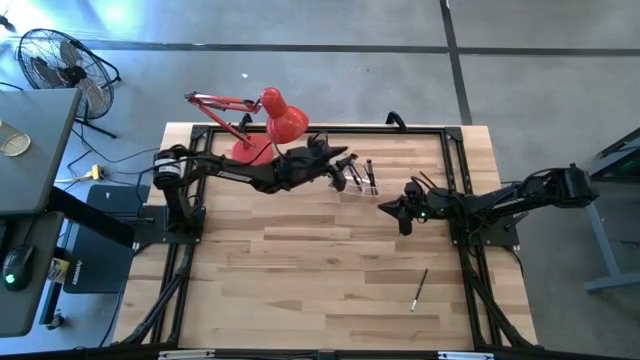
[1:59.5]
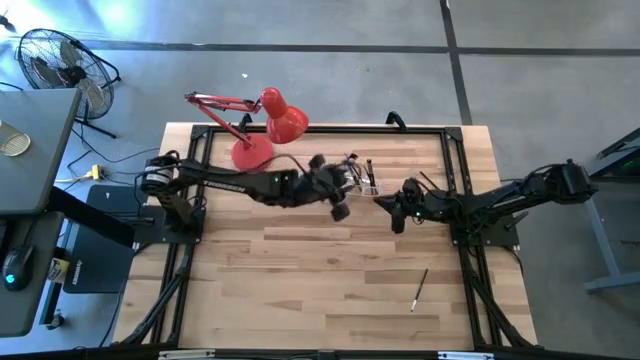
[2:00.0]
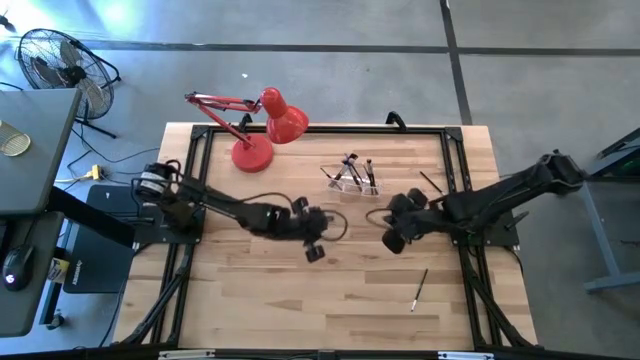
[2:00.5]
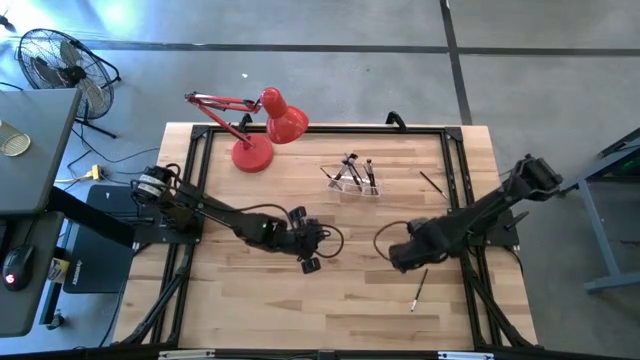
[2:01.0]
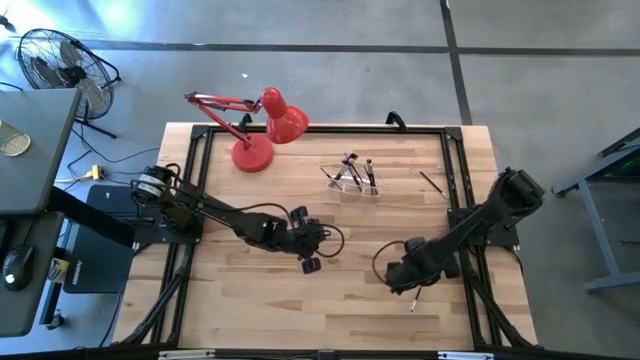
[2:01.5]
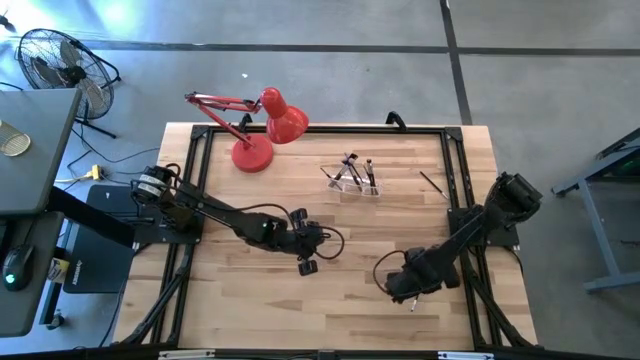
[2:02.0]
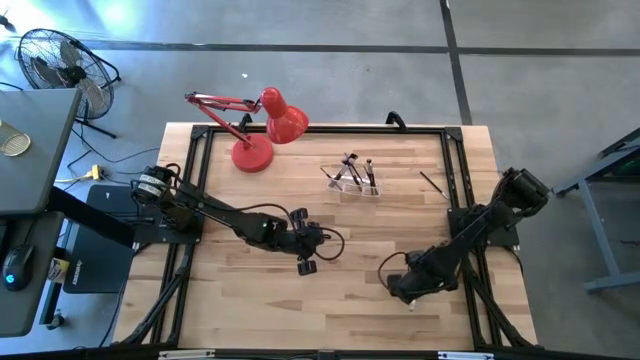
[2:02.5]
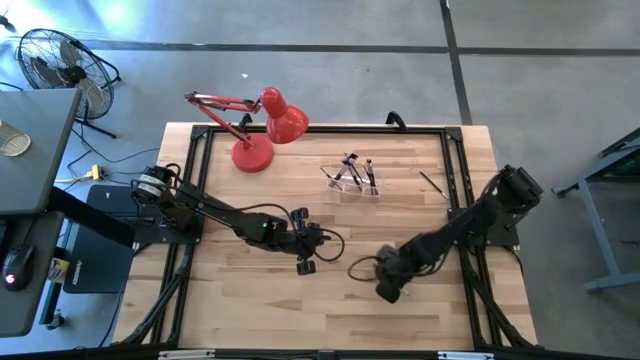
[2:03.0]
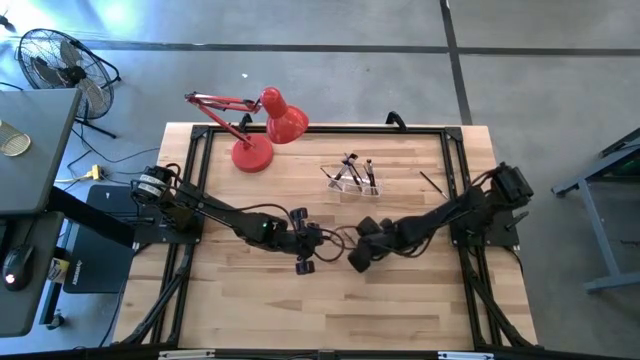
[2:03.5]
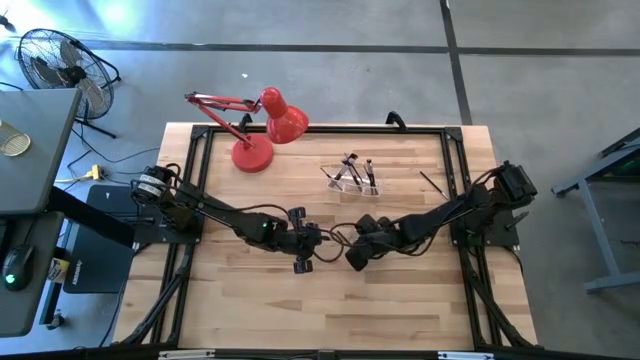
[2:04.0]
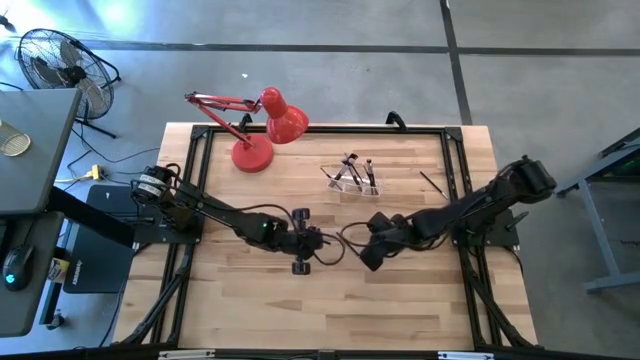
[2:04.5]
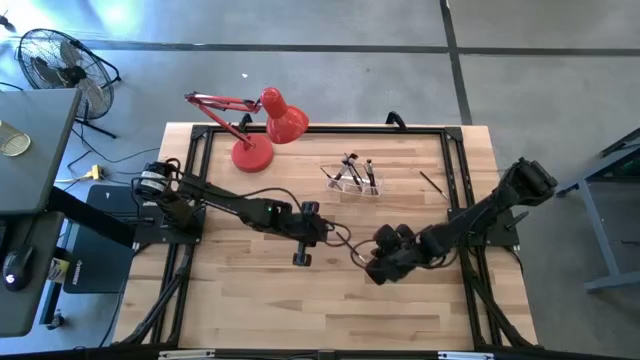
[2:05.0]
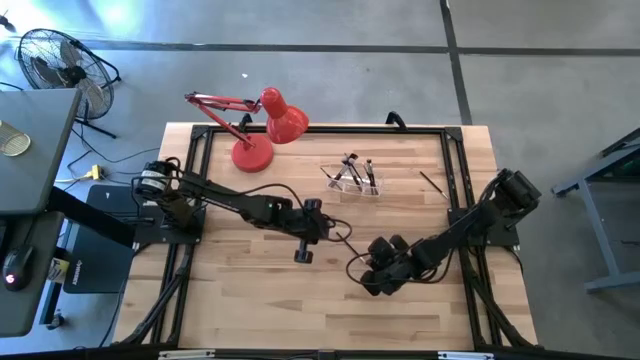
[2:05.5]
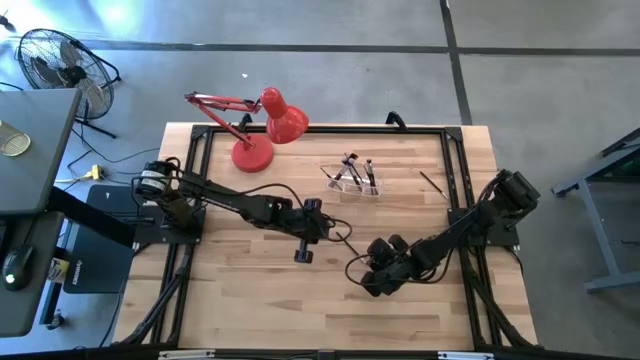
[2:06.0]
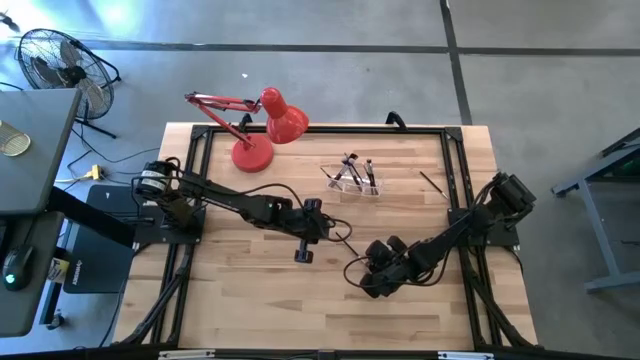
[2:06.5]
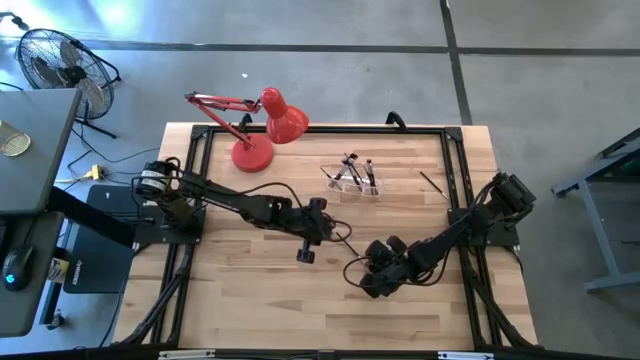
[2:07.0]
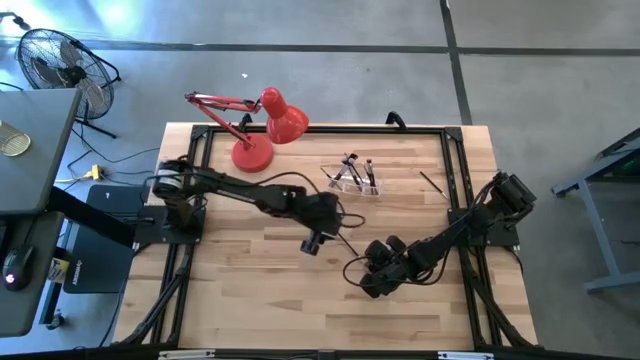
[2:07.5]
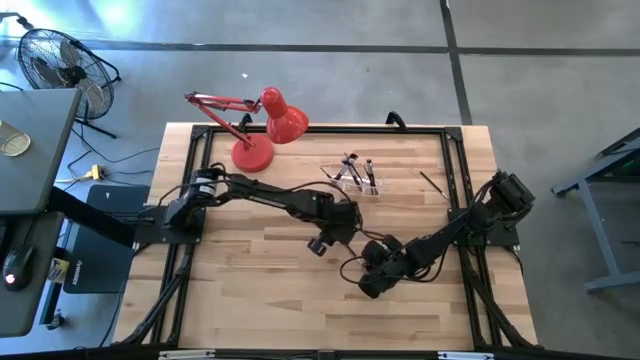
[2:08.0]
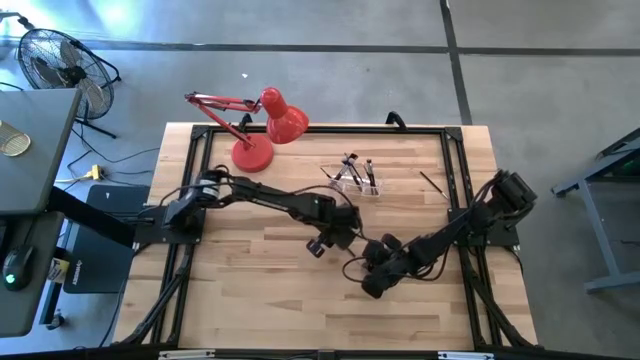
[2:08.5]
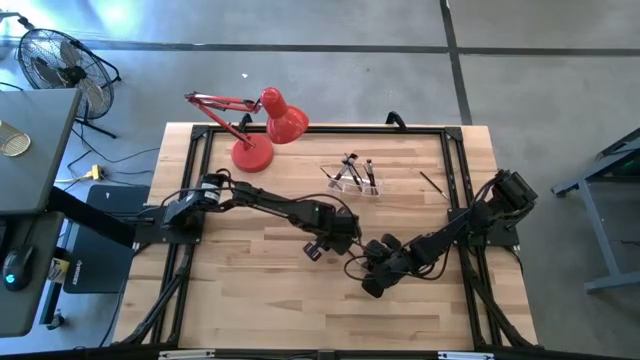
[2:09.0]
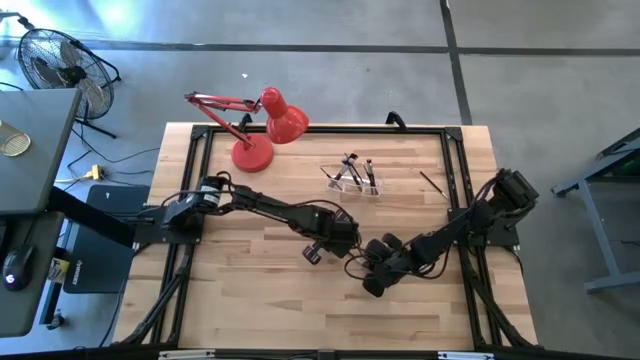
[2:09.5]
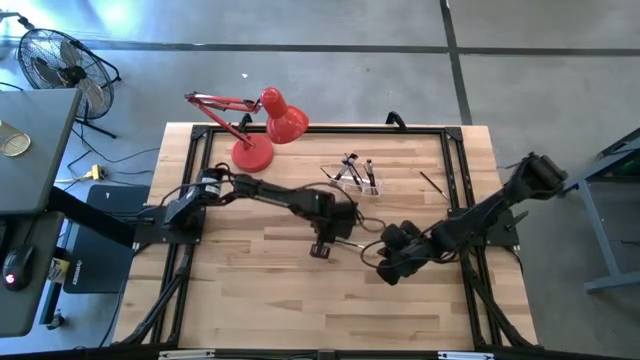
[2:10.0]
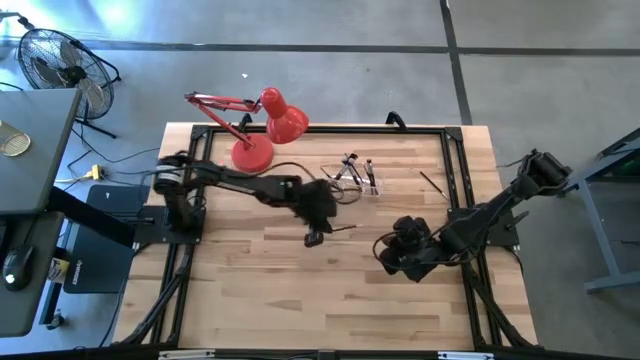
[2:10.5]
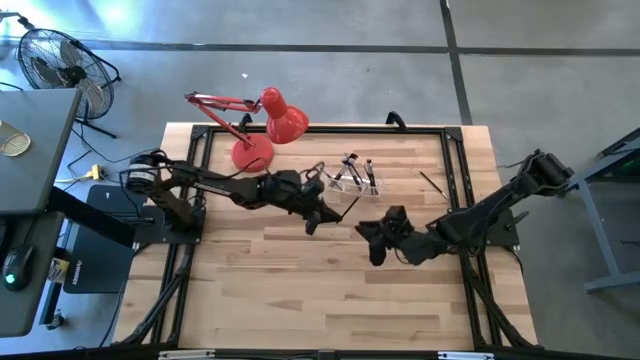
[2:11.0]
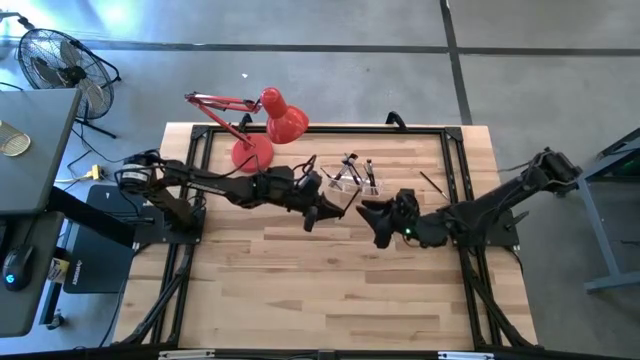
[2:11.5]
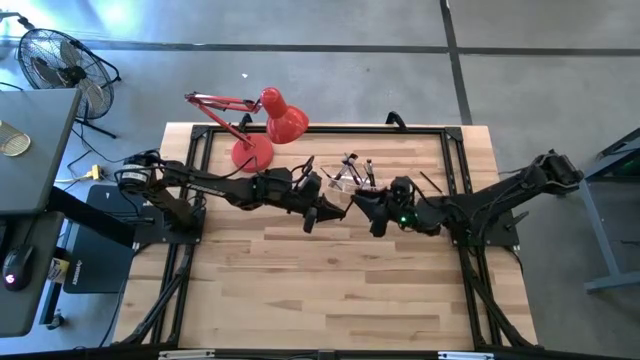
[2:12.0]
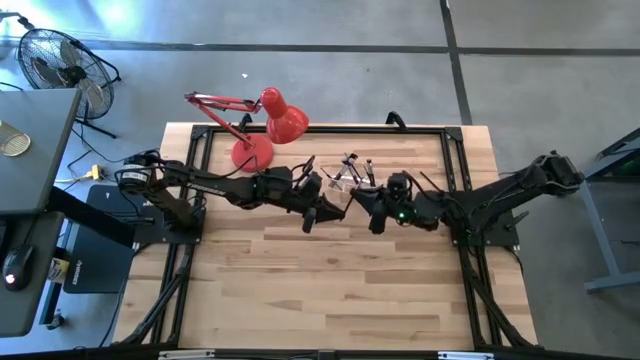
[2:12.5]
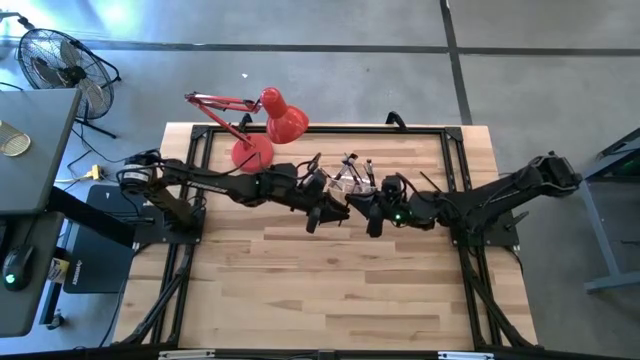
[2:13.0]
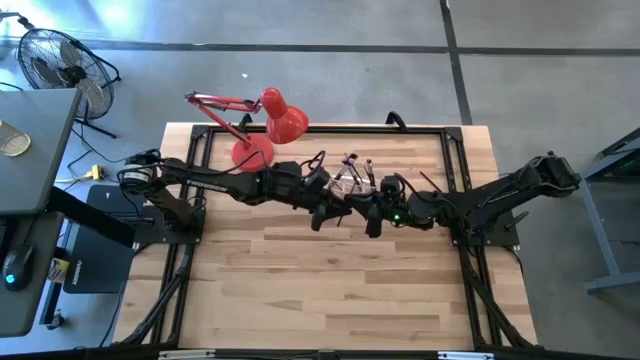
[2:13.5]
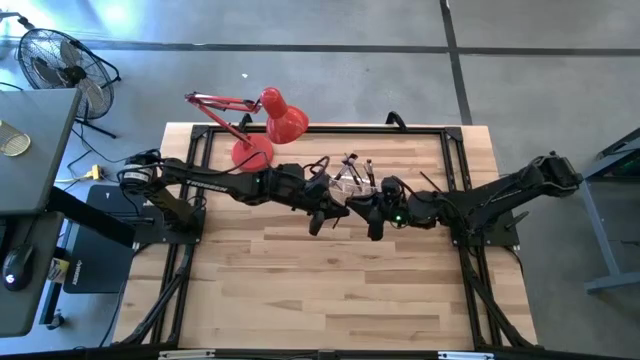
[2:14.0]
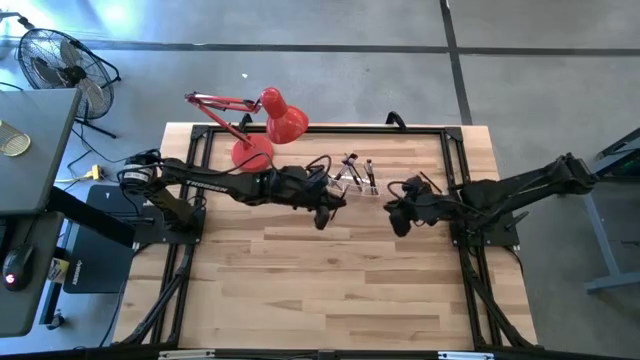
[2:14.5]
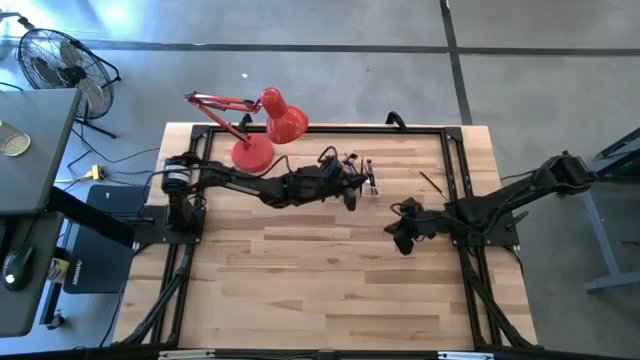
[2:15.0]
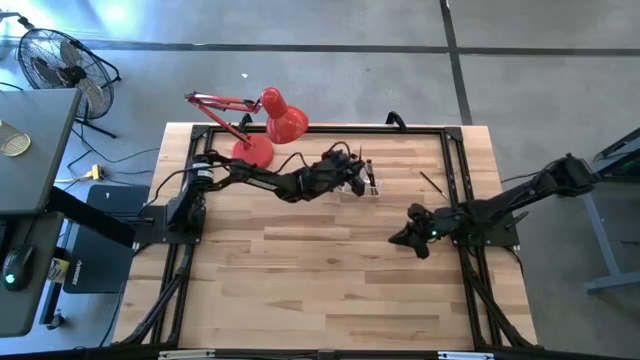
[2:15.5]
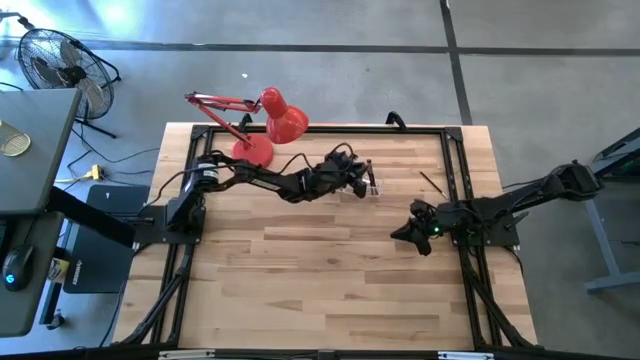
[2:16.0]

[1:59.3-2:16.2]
Task: Put items in baskets/containers
Put the eyeshadow brush into the transparent organizer
